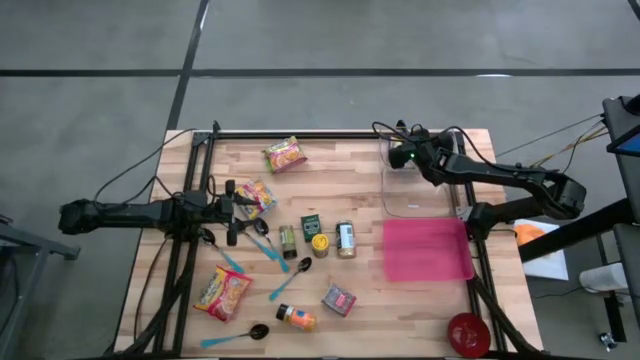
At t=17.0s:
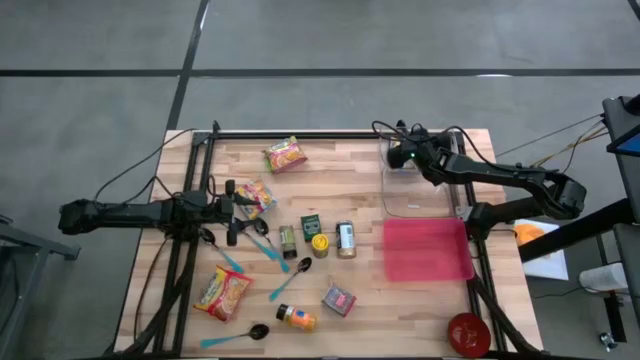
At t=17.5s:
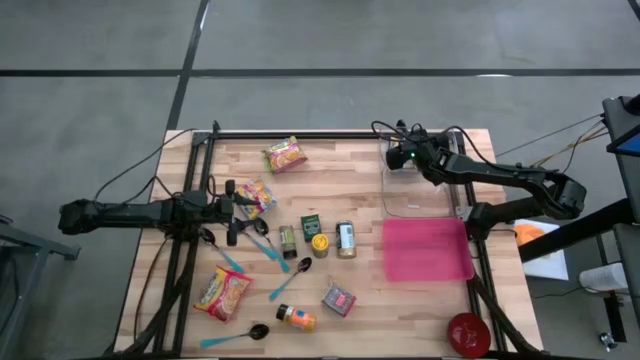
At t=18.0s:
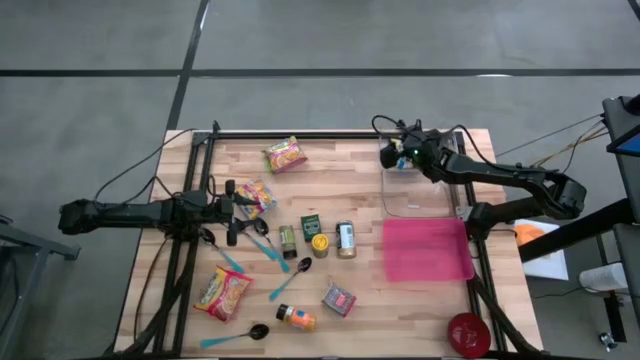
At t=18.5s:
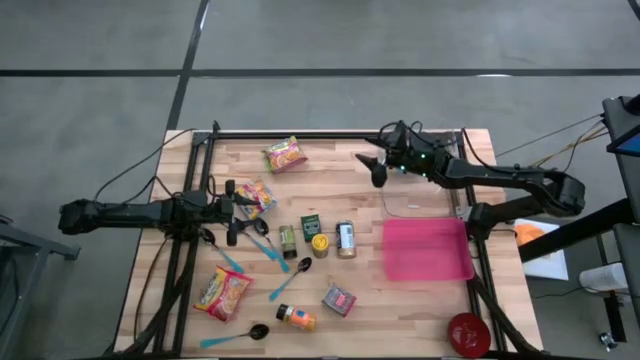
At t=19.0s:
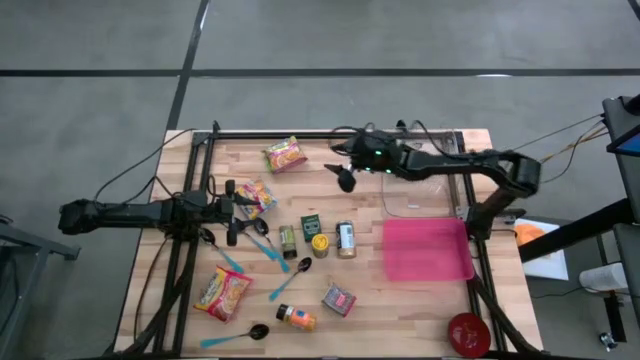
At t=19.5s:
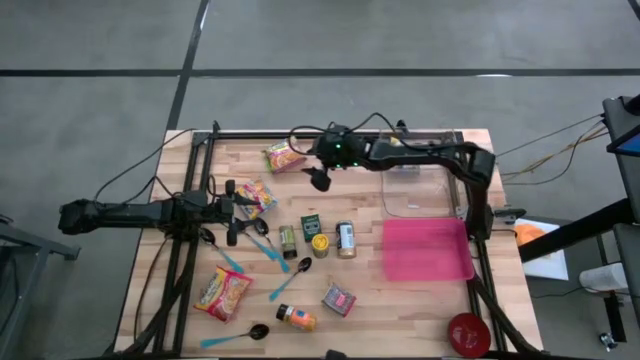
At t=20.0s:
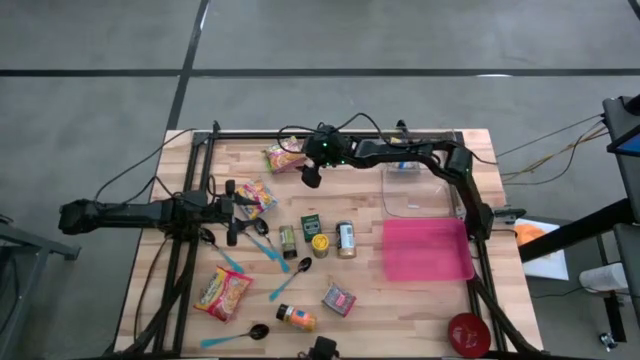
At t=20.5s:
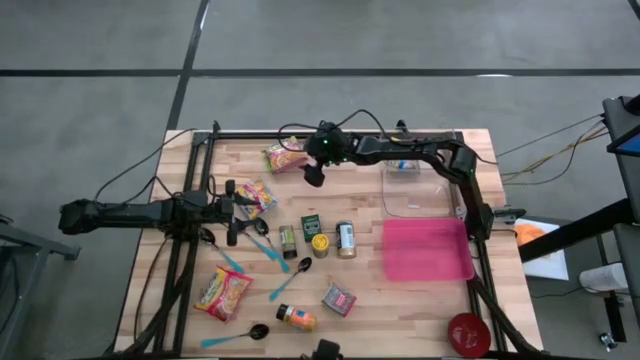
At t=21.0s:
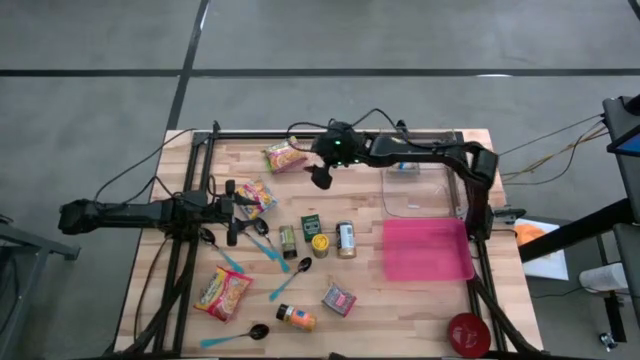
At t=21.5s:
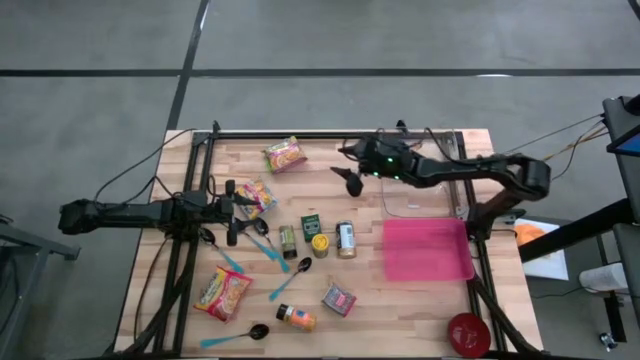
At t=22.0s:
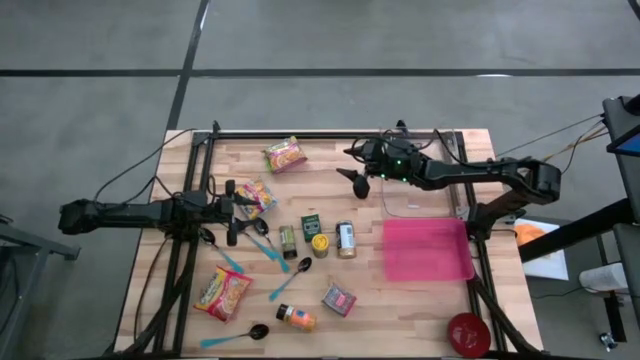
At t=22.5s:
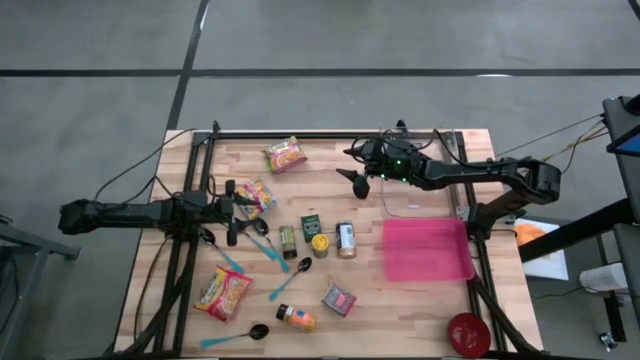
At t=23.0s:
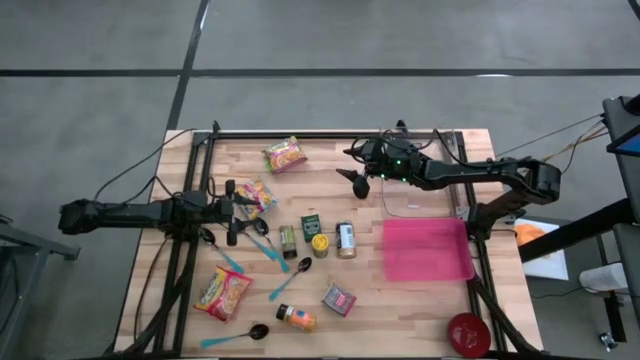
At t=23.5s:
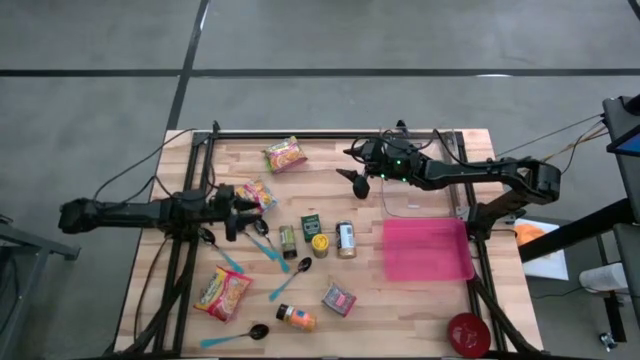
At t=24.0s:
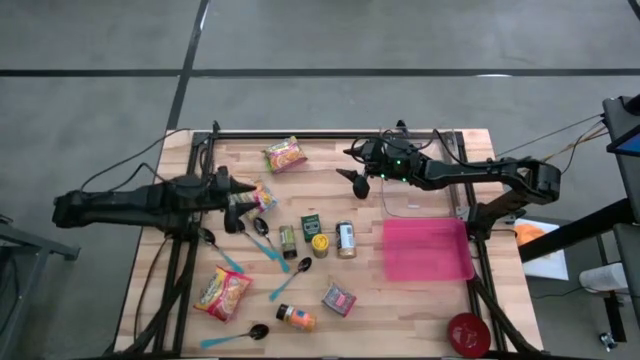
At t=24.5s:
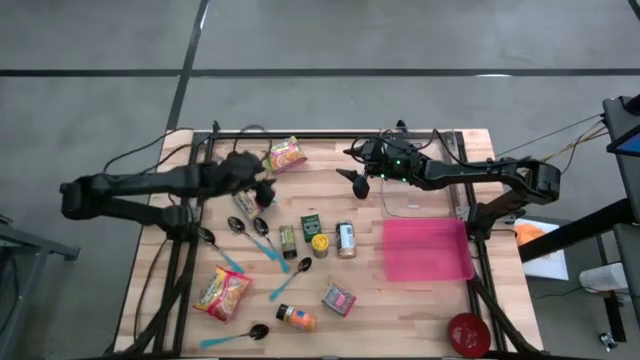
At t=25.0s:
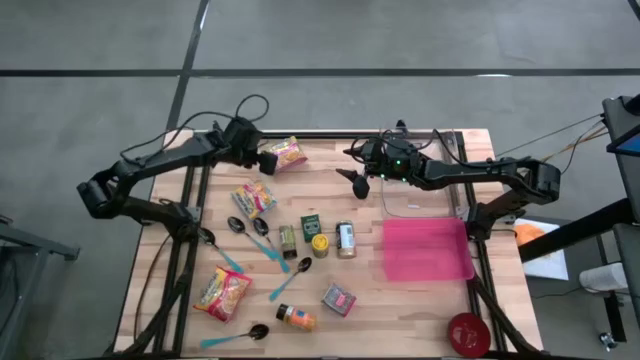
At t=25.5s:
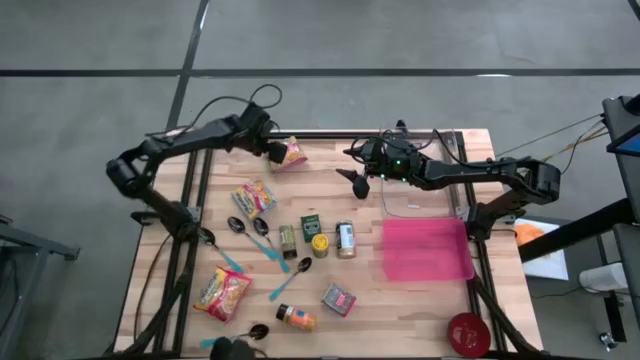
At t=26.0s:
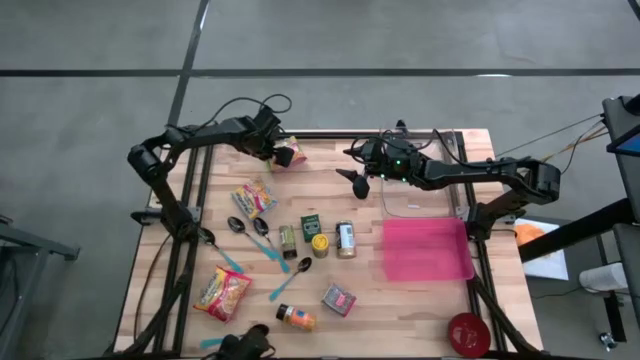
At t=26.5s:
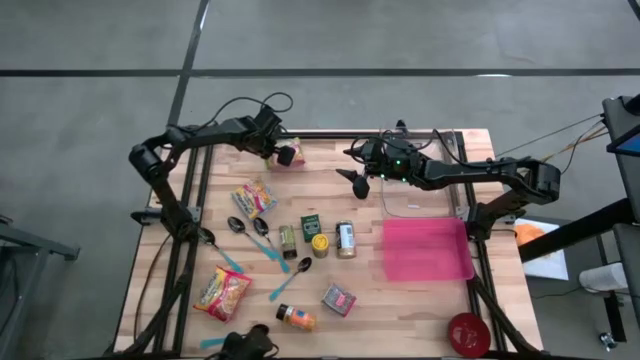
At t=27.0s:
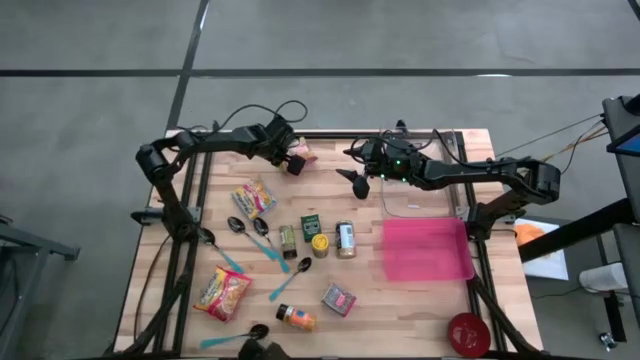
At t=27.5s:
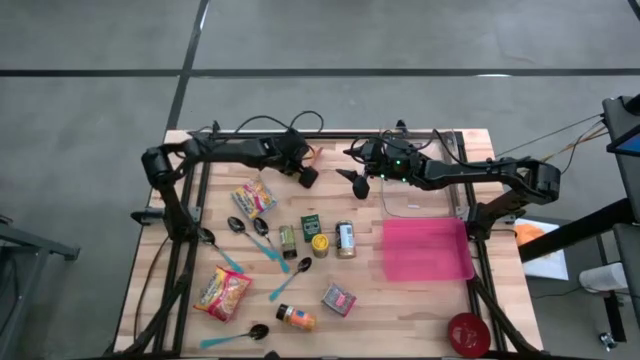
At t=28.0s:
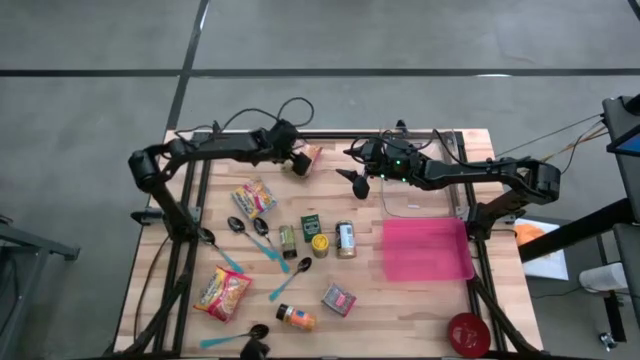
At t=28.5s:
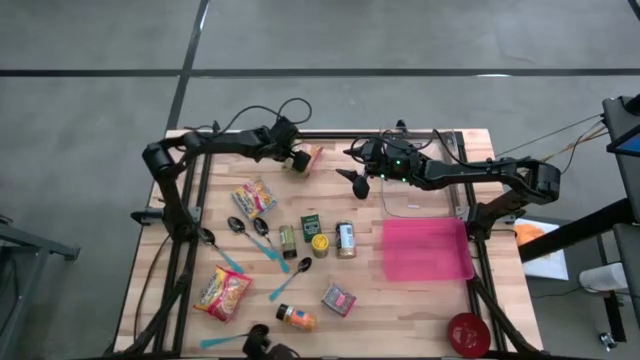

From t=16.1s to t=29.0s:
Put the green noodle pack into the top transparent bin

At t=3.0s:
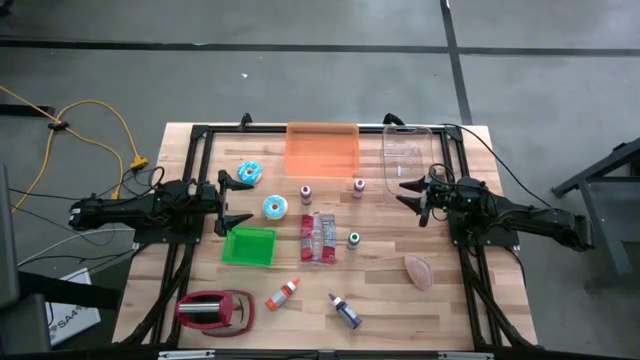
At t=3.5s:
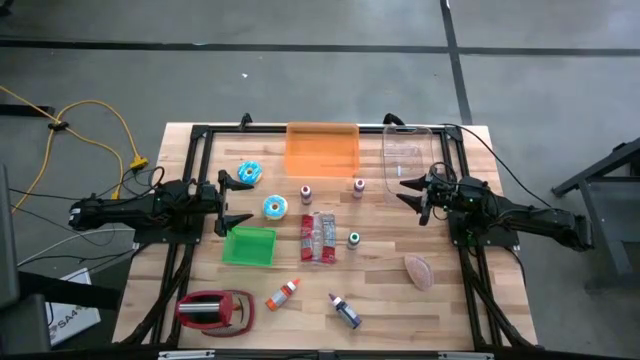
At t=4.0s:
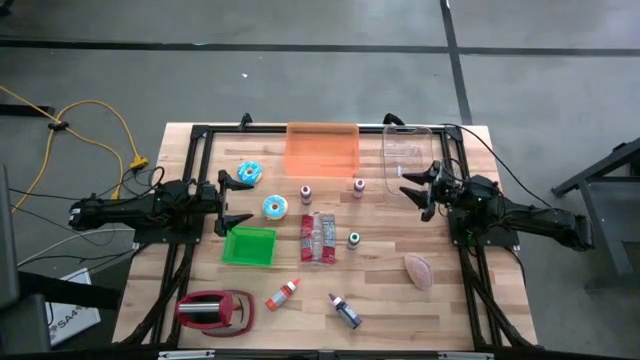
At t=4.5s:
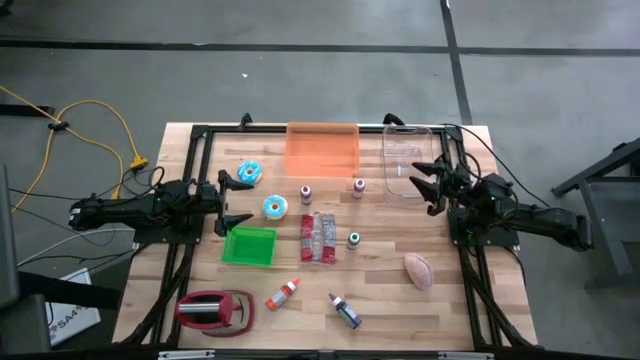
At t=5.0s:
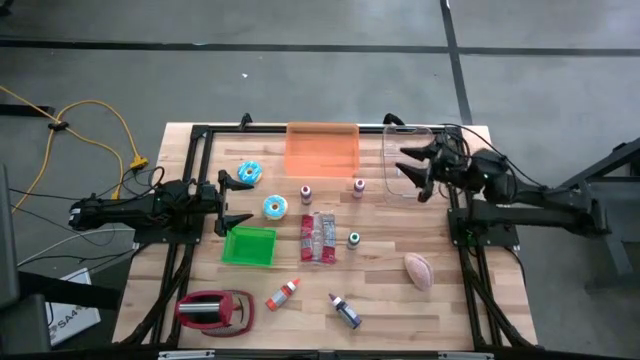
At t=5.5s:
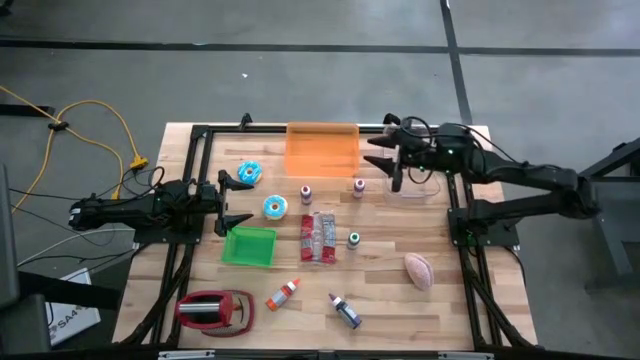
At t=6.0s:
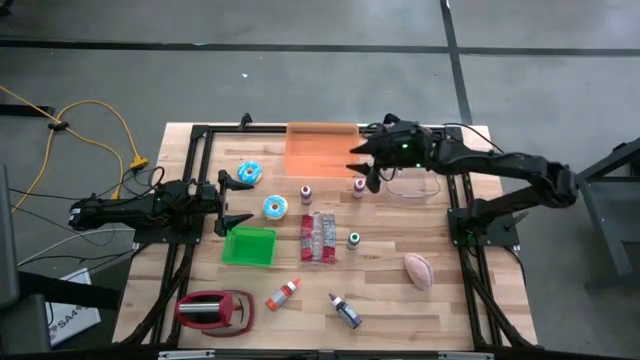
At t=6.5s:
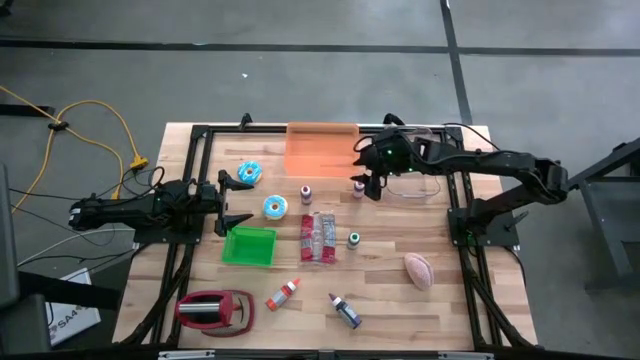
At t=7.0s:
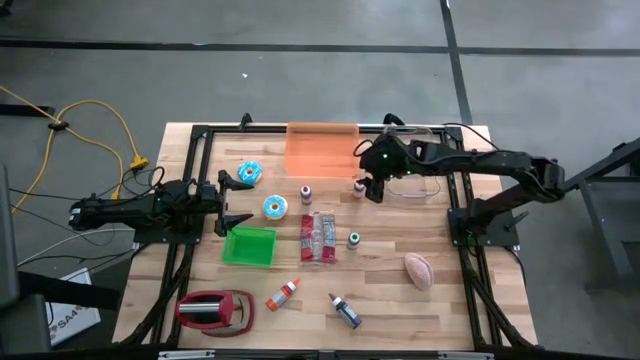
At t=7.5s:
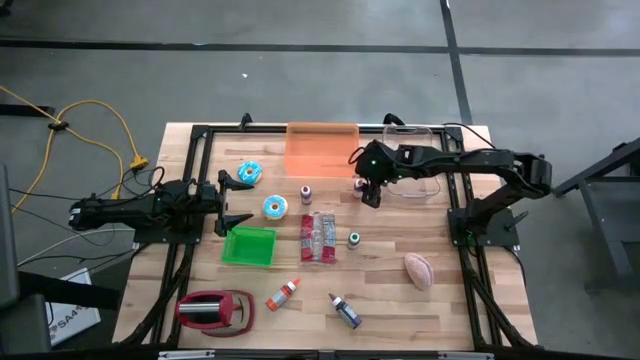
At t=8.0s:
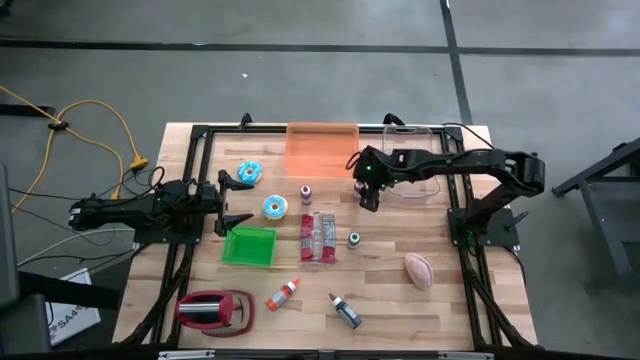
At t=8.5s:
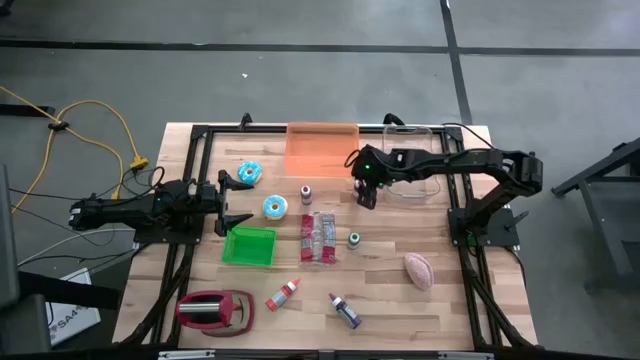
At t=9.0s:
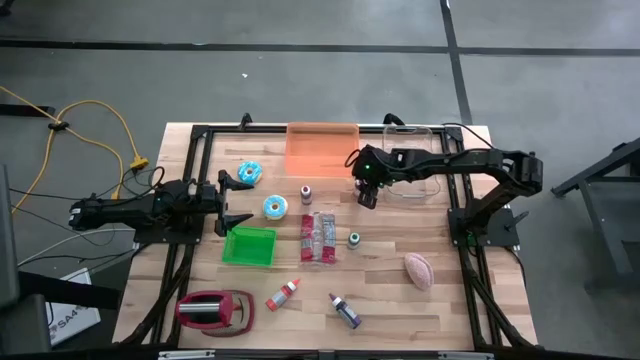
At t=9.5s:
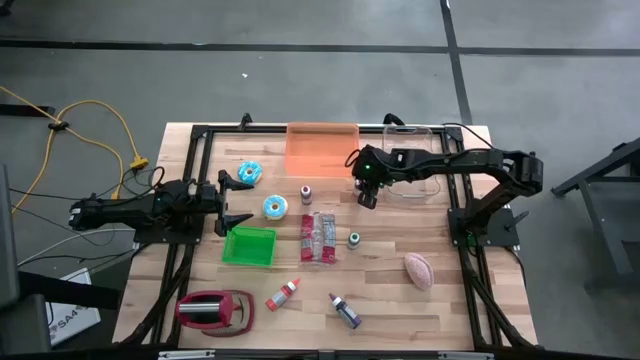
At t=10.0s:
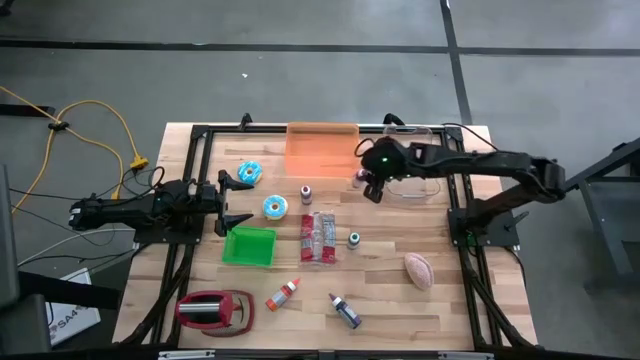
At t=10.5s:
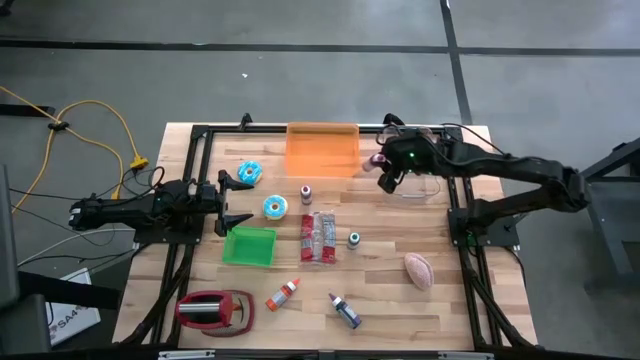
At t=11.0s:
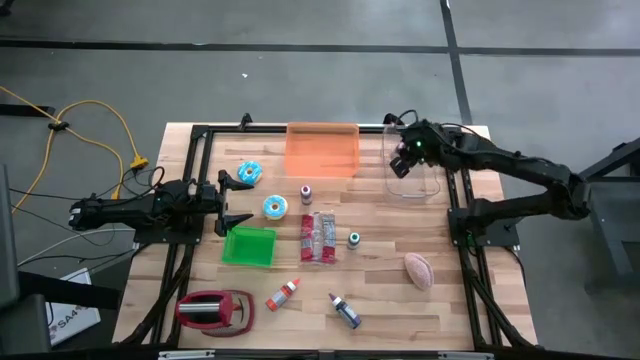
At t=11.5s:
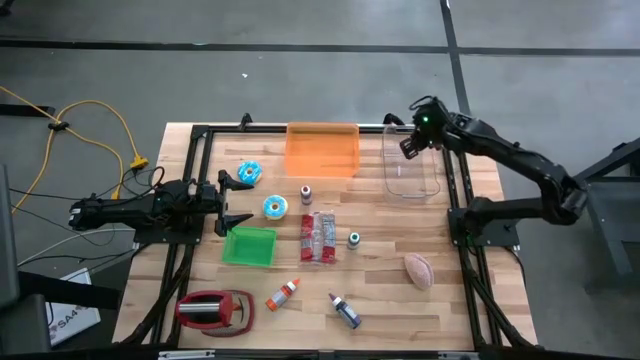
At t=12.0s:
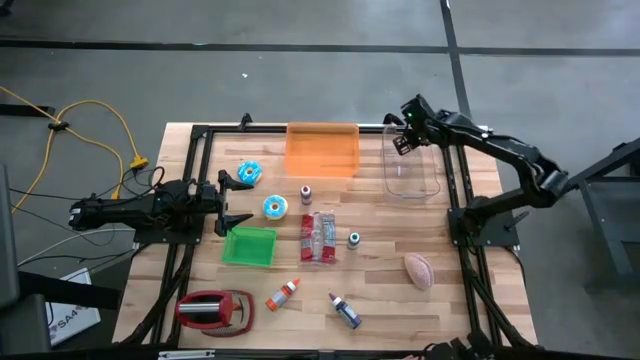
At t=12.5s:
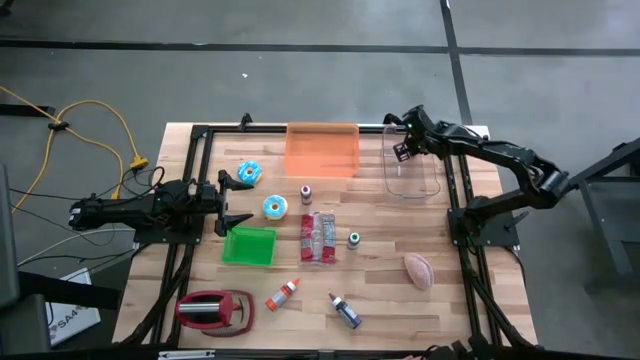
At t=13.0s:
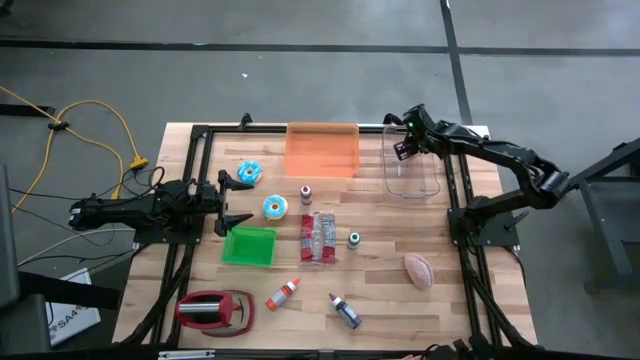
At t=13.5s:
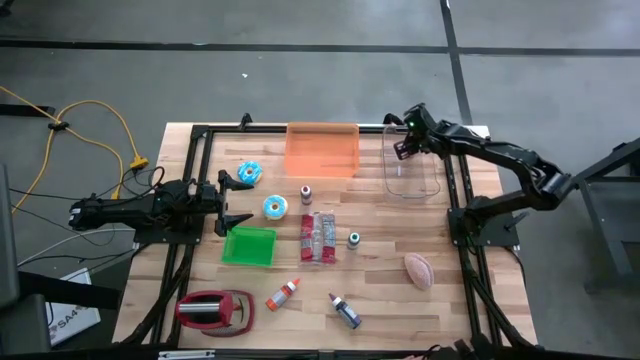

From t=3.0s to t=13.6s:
Put the pink food coloring bottle into the transparent bin
